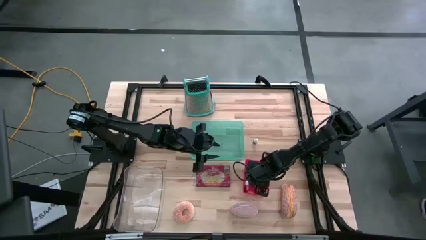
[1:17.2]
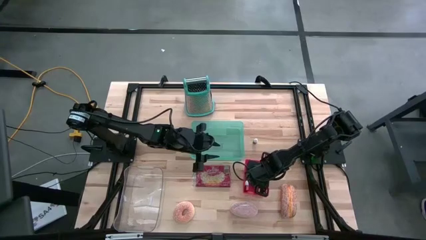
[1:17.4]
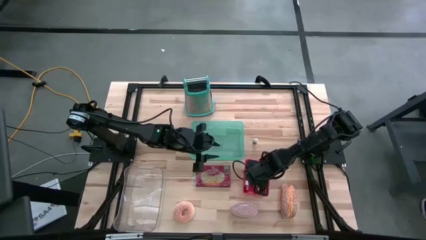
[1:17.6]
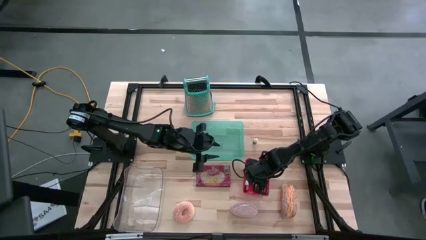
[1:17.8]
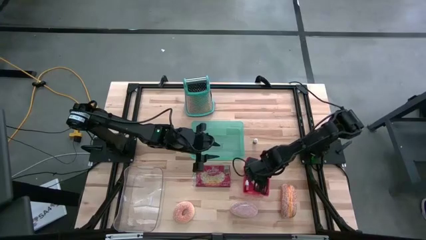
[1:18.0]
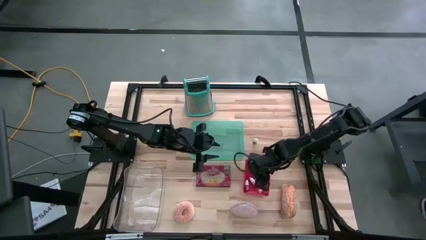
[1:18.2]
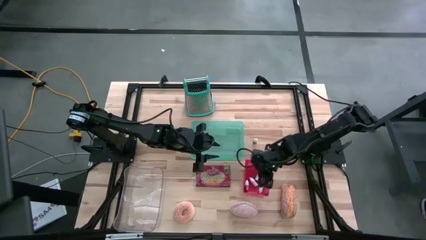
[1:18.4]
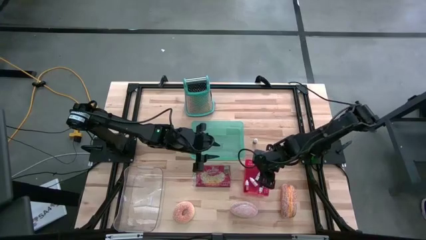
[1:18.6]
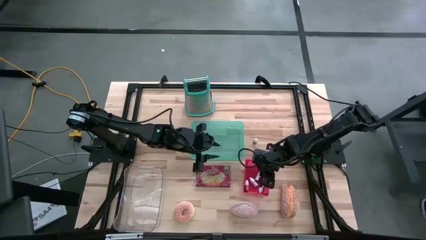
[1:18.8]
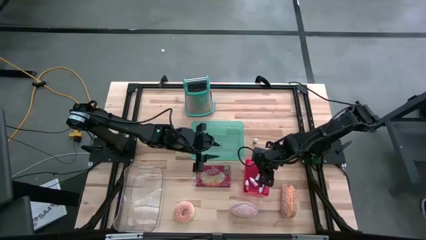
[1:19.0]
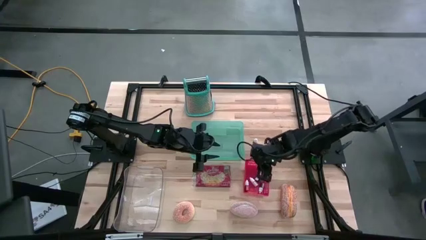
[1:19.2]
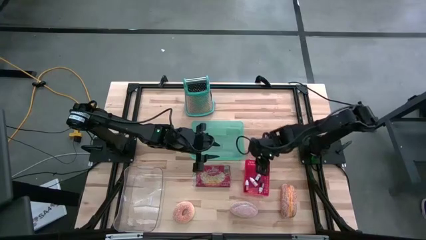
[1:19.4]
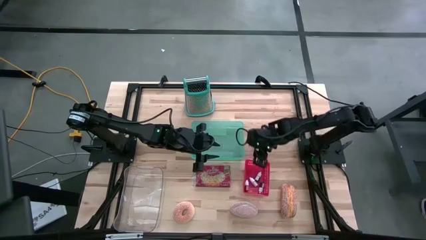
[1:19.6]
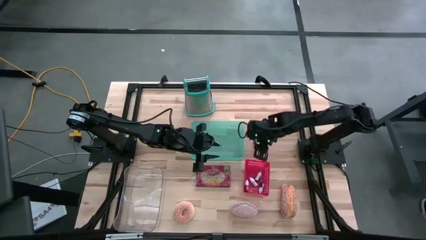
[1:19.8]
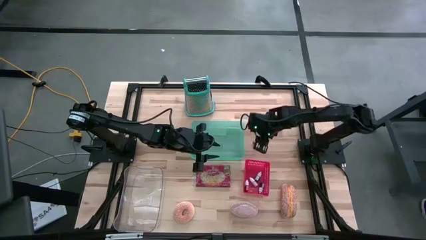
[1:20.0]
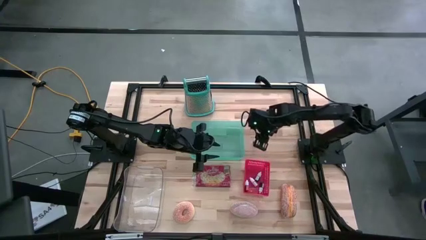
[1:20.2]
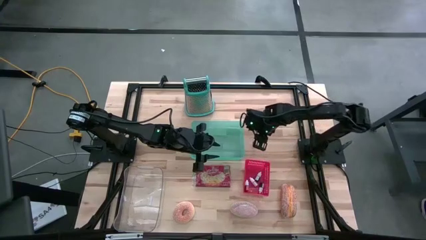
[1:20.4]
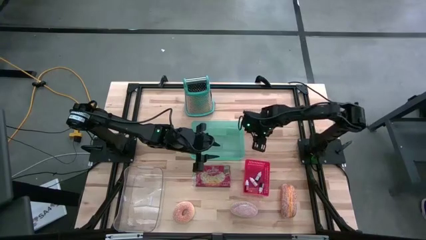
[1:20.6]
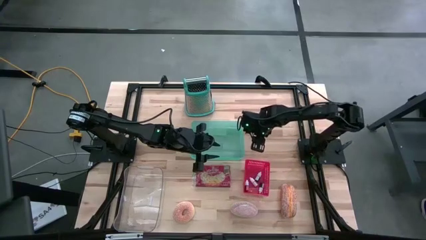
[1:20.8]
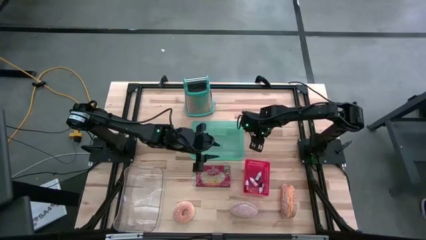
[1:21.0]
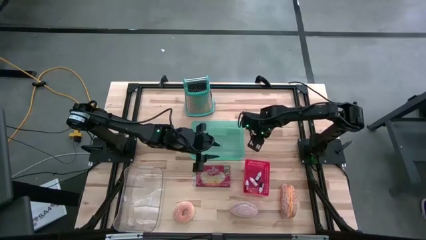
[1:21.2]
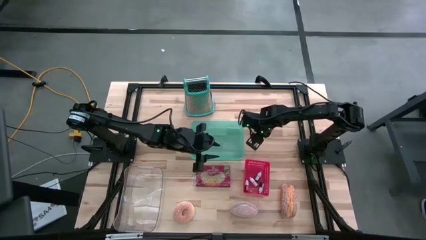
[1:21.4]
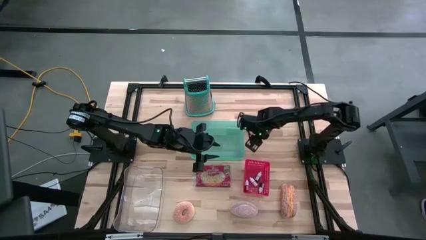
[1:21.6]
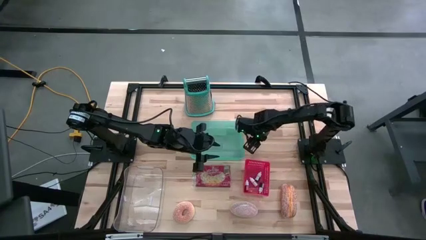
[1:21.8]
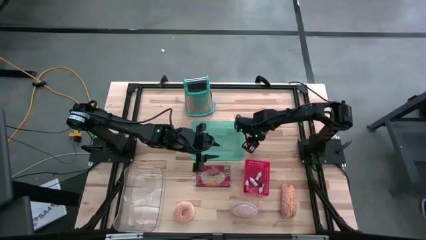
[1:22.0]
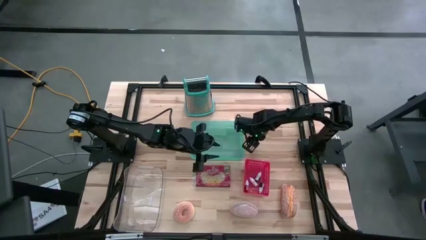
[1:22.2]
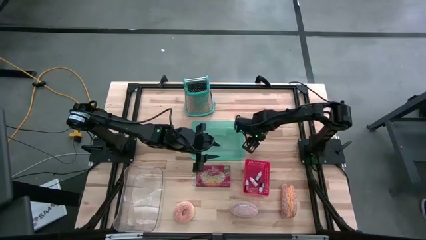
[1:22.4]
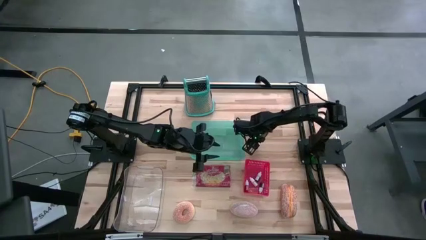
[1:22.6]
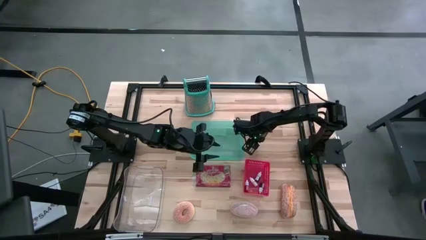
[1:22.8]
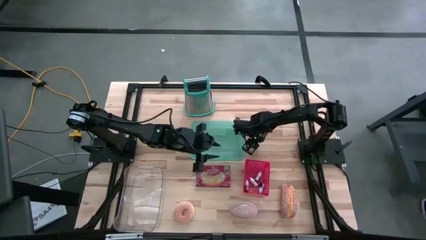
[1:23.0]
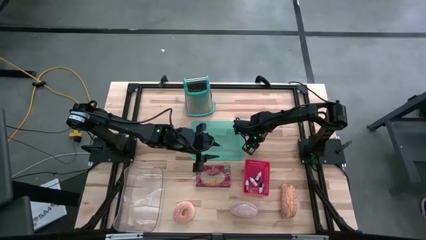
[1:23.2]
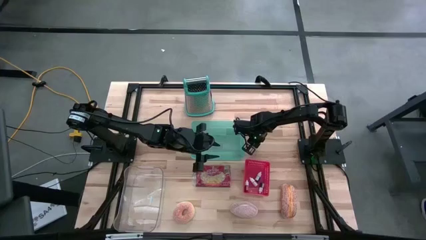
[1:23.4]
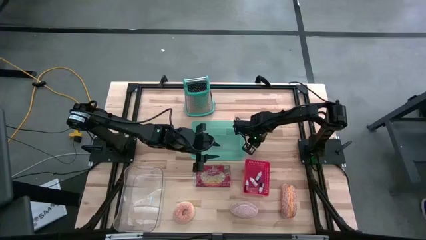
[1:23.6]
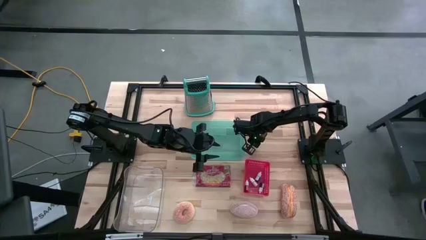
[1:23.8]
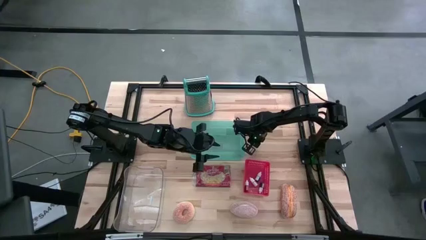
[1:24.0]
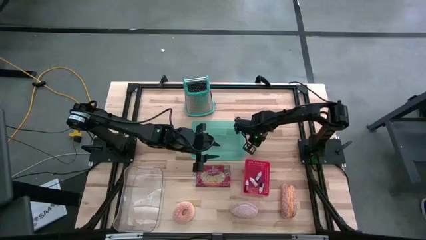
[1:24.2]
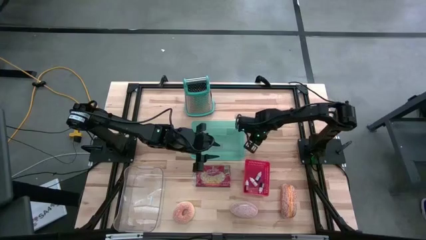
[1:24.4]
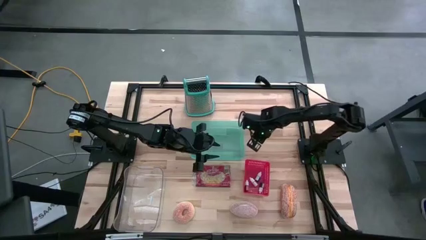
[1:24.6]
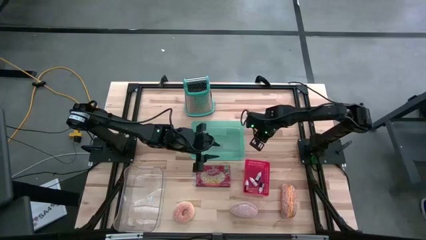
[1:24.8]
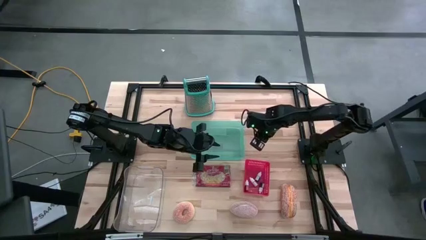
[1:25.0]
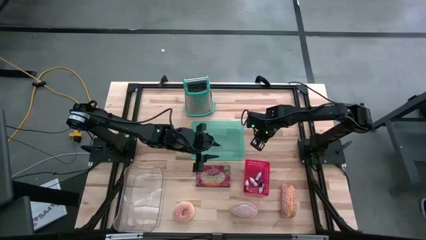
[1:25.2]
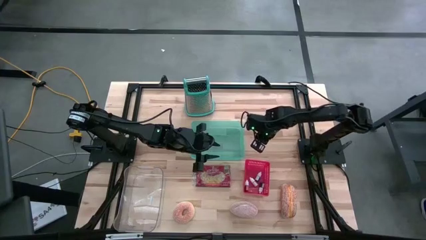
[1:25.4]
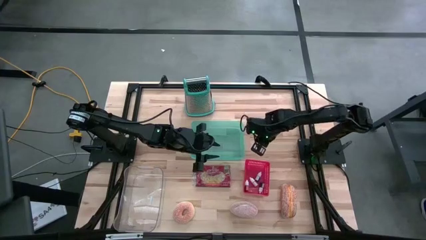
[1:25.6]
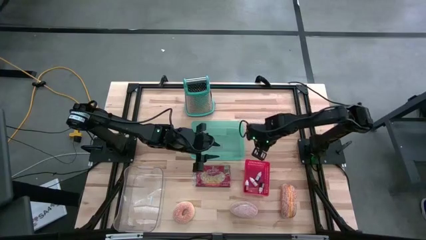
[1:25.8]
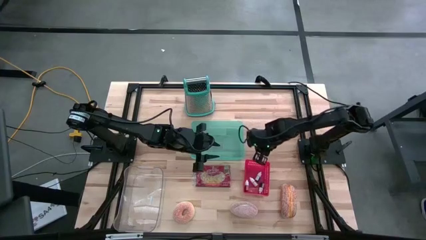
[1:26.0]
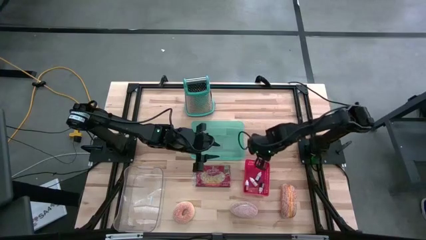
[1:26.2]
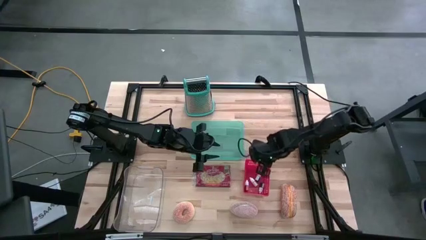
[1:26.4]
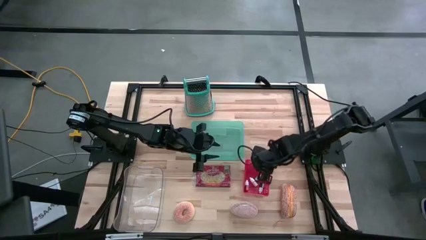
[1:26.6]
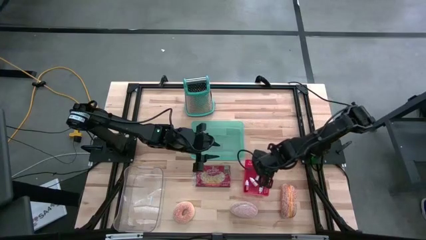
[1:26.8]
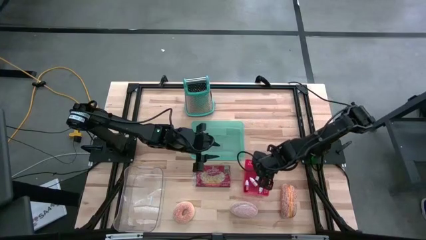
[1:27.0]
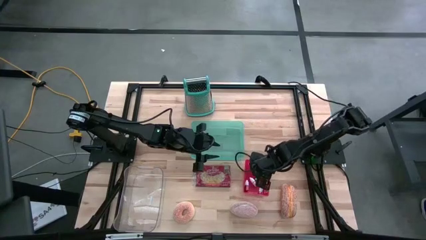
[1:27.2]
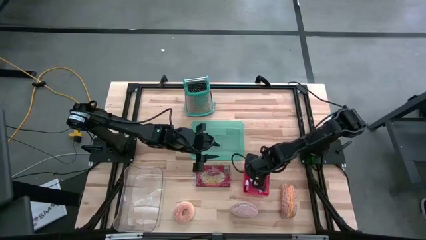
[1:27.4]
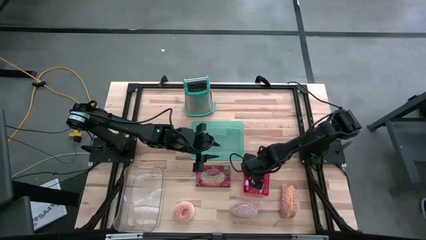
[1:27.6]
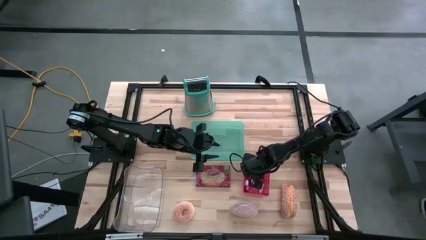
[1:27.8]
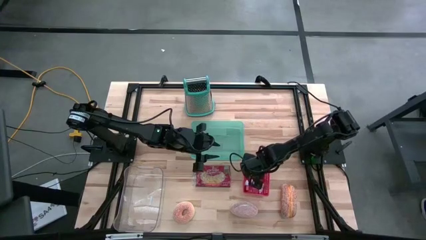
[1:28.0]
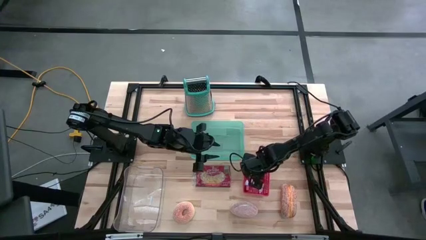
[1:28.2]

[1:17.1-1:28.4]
Task: Pick & Place Food Item
Put the red food coloring bottle into the red bin

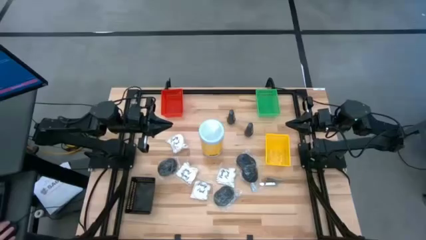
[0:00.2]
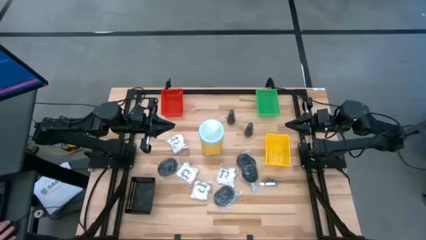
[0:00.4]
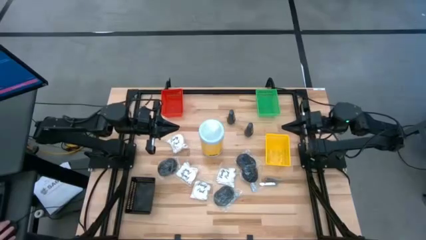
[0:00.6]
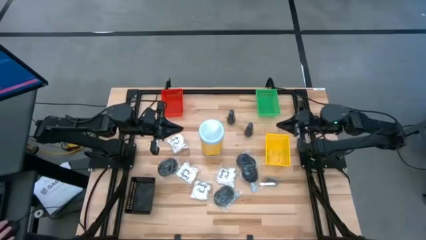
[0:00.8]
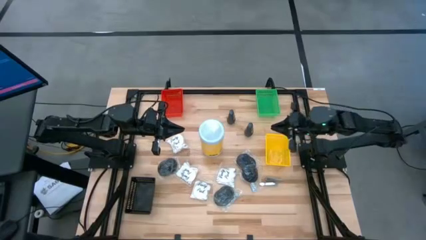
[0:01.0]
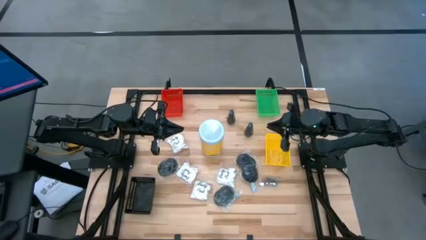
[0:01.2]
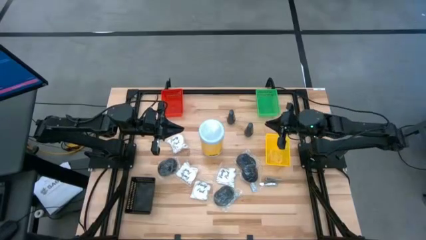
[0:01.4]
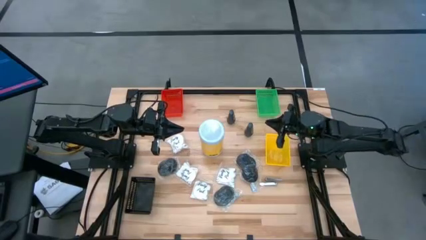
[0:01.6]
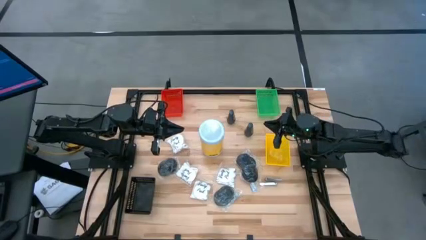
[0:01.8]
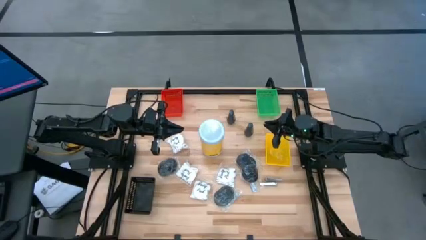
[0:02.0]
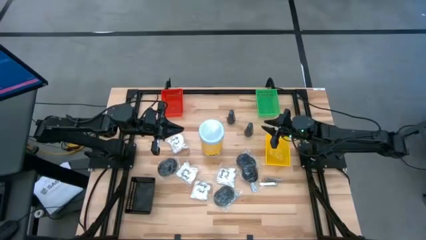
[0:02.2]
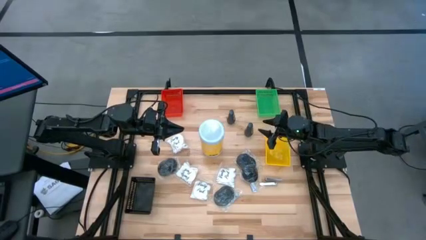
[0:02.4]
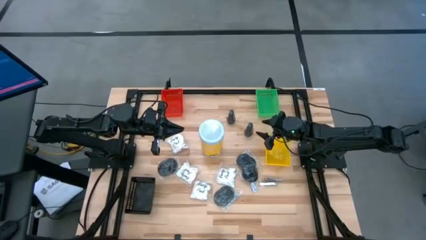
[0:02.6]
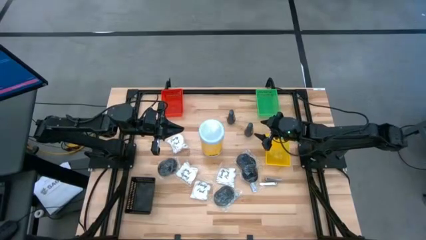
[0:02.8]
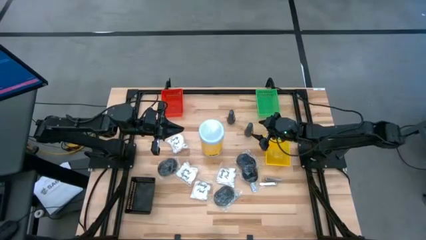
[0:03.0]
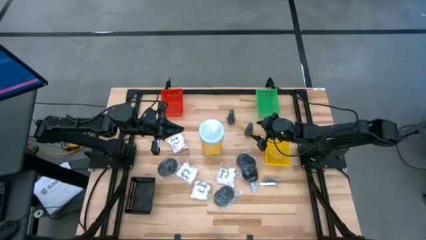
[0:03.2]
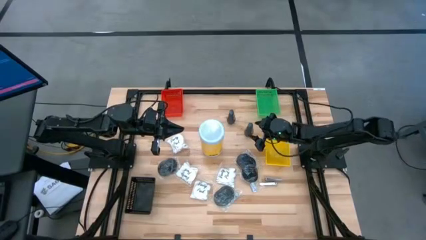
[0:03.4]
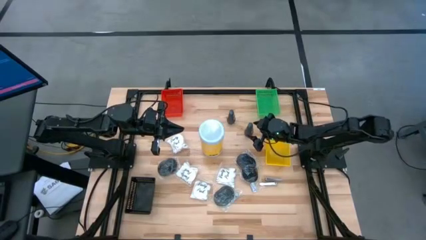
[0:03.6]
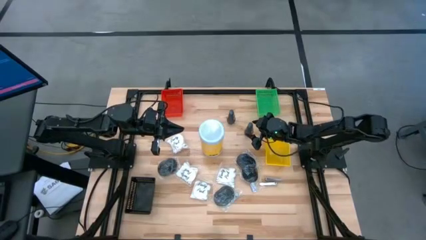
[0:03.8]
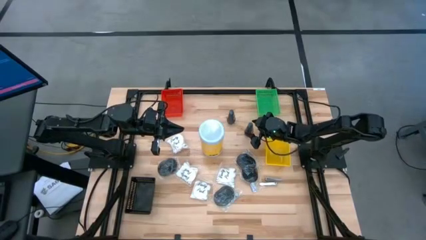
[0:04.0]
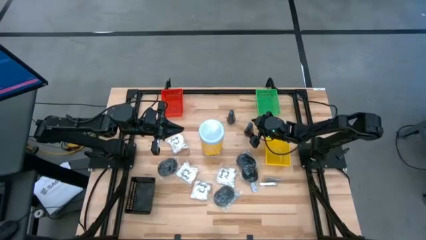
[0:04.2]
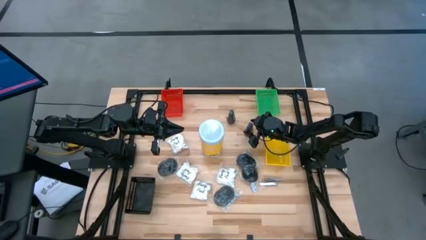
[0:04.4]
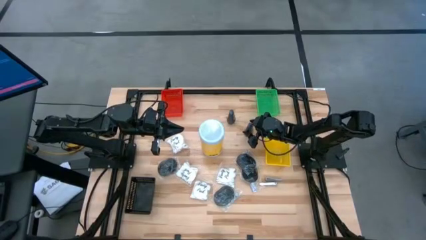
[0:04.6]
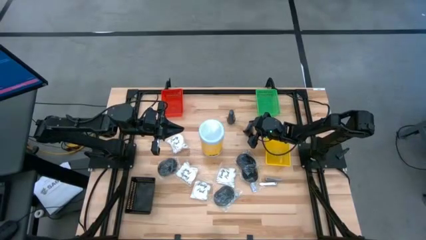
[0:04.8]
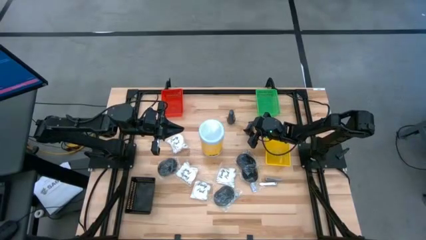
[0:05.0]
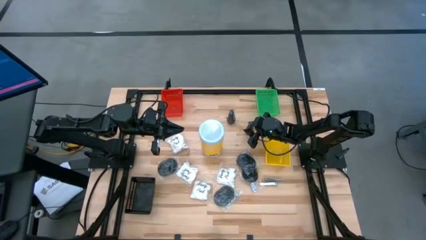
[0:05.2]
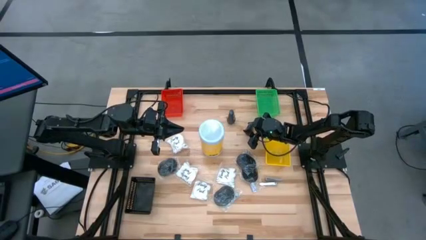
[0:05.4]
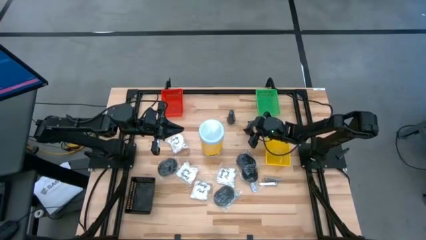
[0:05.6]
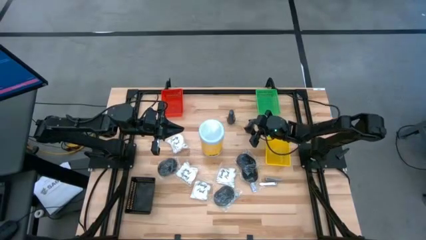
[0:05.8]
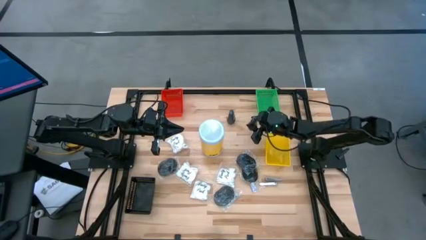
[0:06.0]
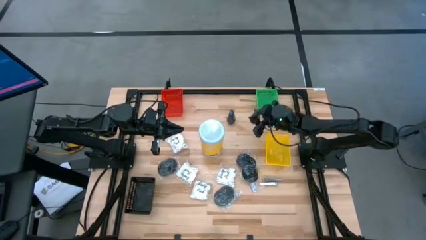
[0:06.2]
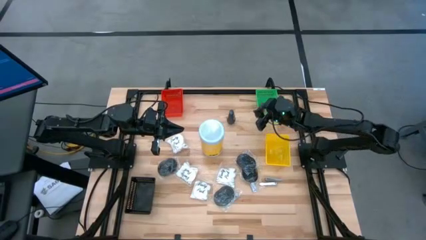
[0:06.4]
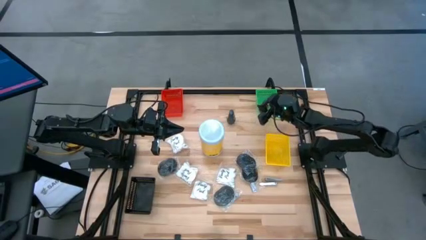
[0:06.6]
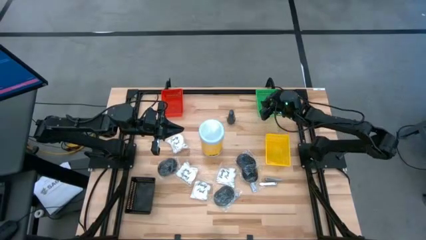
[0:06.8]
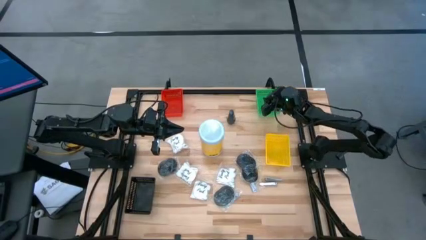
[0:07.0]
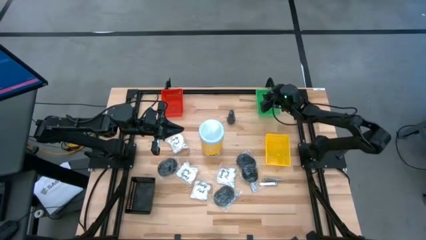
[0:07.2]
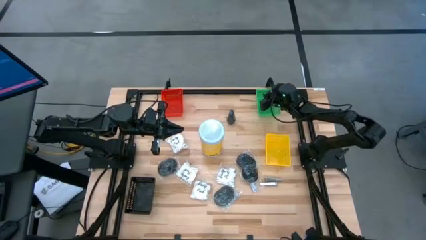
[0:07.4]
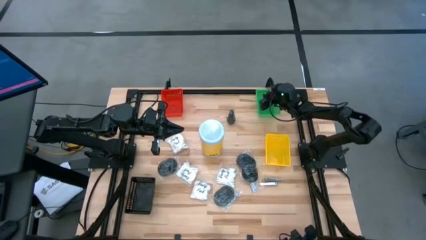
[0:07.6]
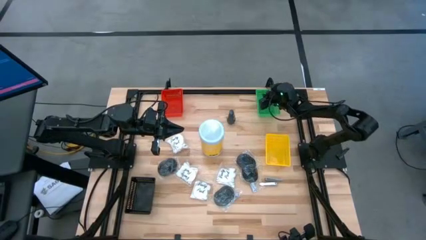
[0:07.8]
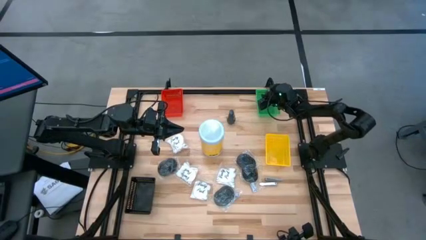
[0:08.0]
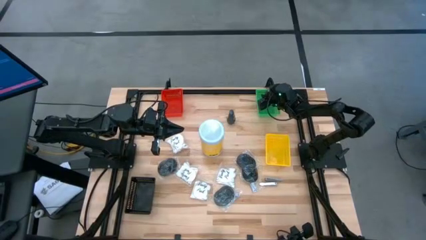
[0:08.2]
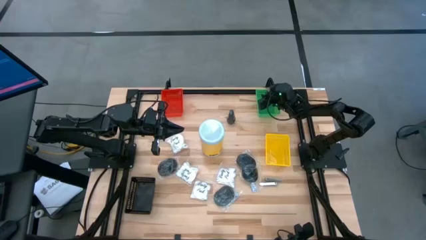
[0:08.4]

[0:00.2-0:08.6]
Task: Pick & Place Travel size toiletries
Put the black deodorant into the green bin
